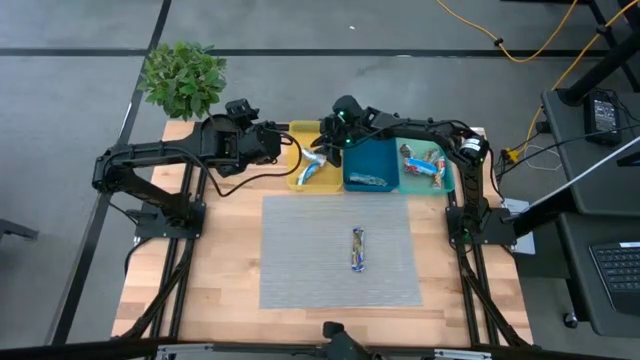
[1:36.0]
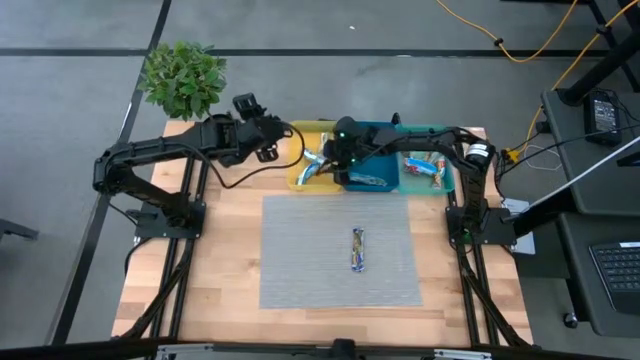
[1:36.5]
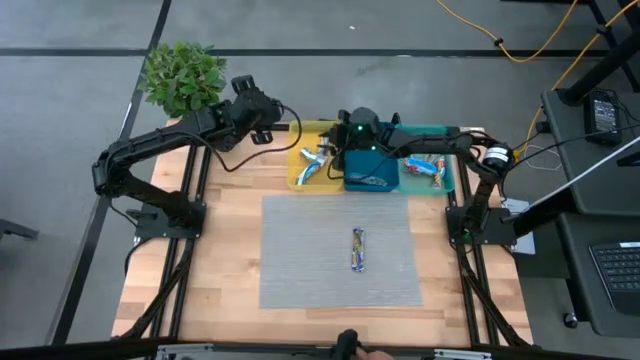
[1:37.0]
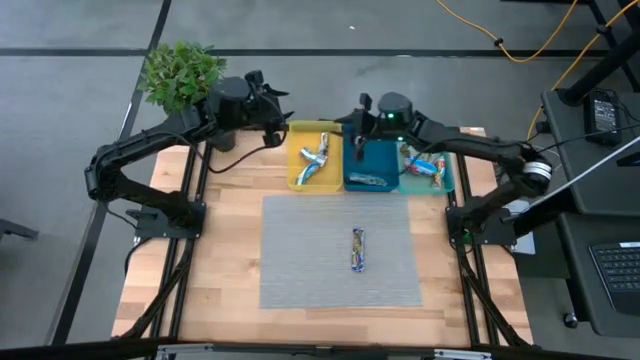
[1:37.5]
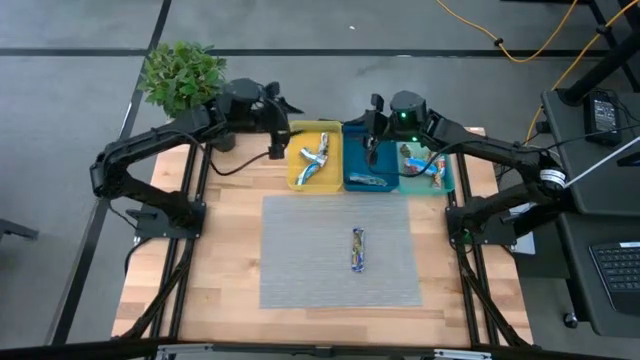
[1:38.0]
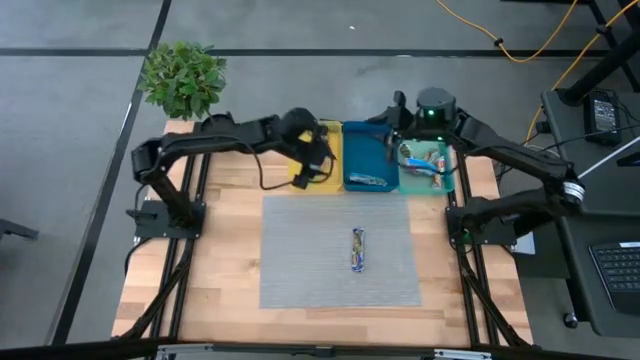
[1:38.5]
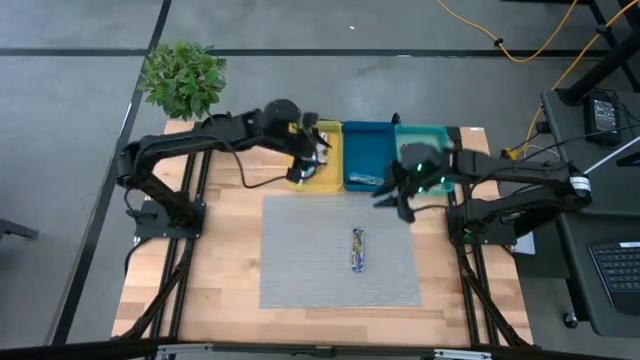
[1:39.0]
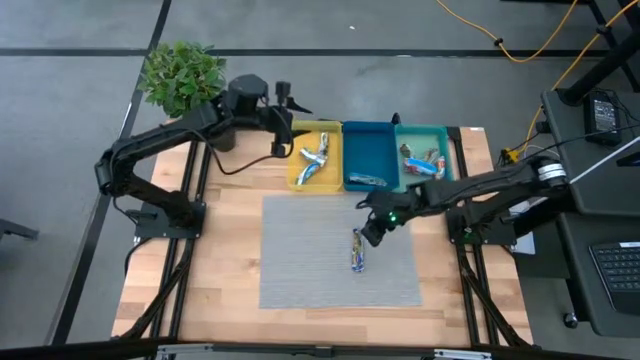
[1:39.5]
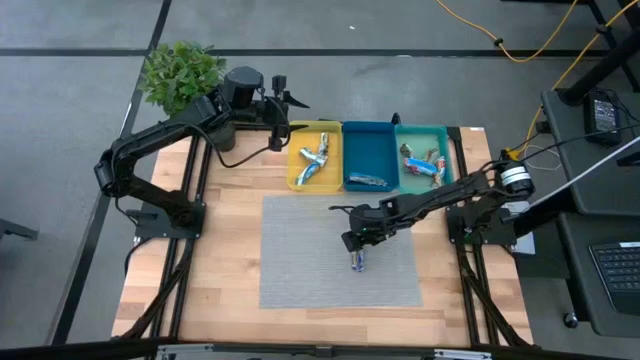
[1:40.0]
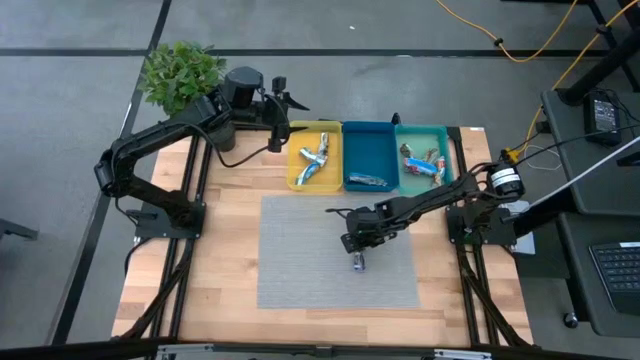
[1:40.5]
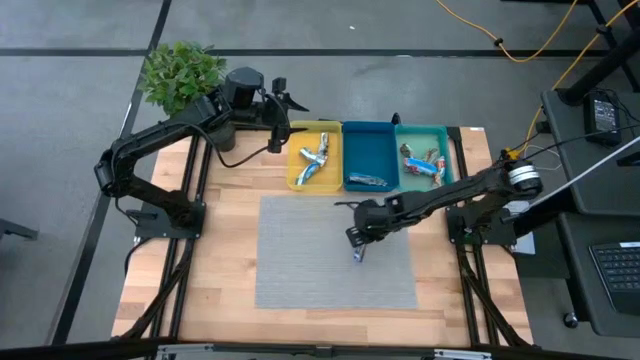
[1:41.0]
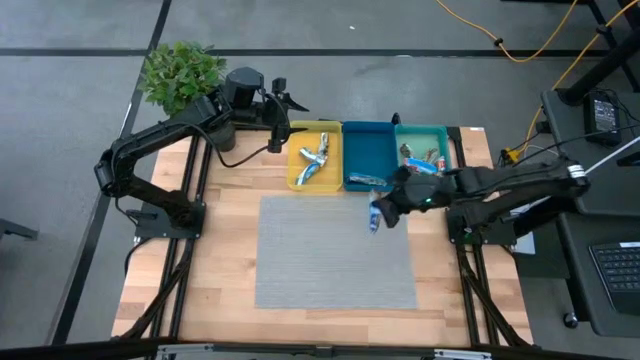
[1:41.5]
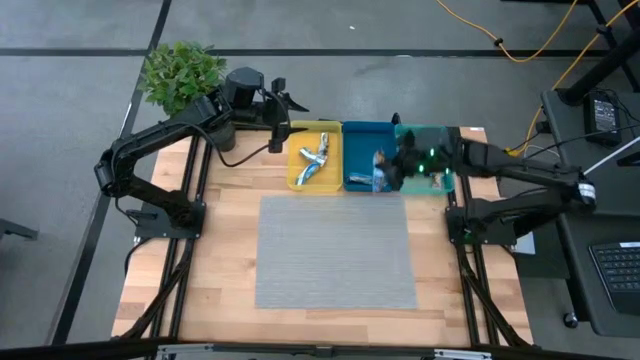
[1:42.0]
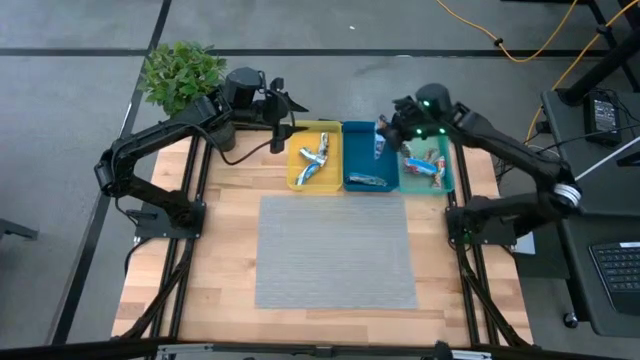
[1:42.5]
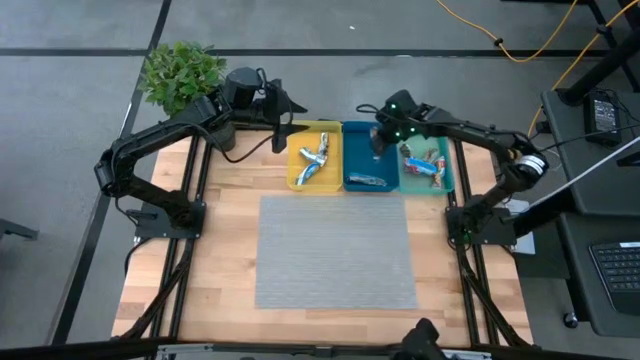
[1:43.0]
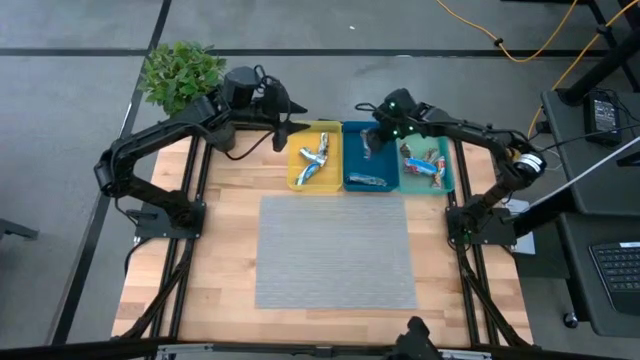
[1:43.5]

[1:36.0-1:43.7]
Task: Pick and place Granola Bars by type
Put the blue granola bar into the blue bin

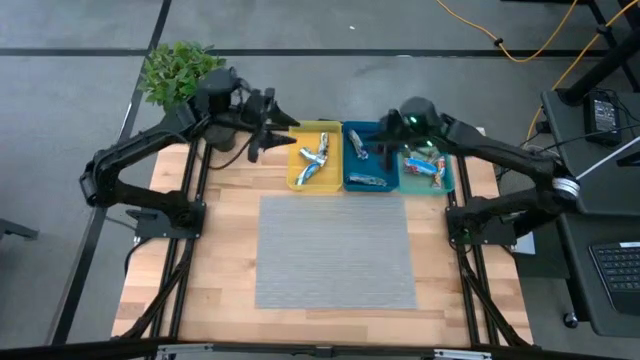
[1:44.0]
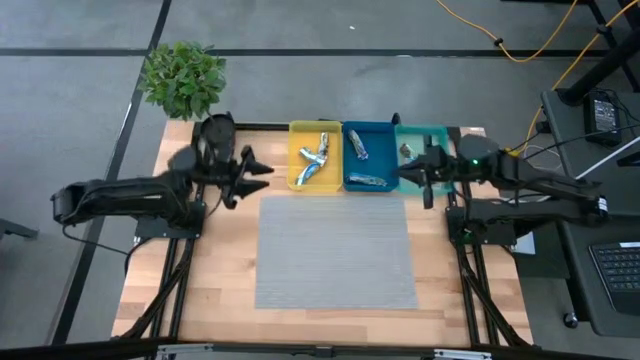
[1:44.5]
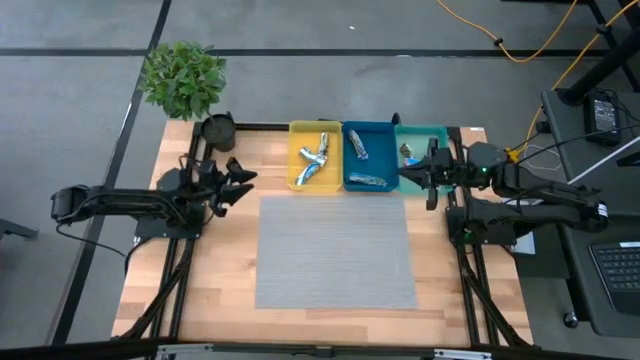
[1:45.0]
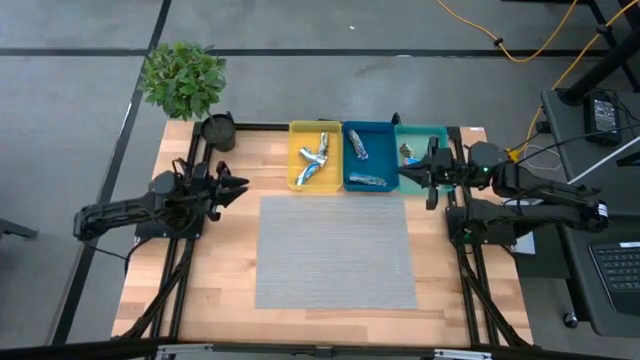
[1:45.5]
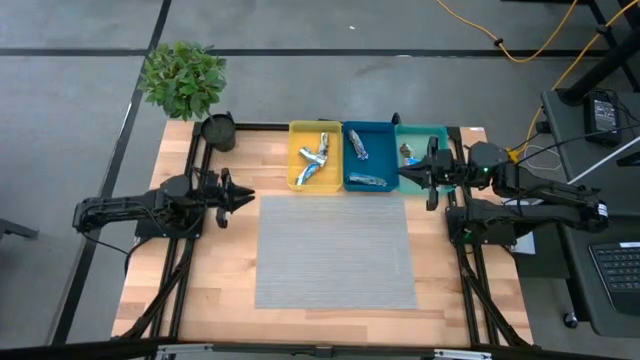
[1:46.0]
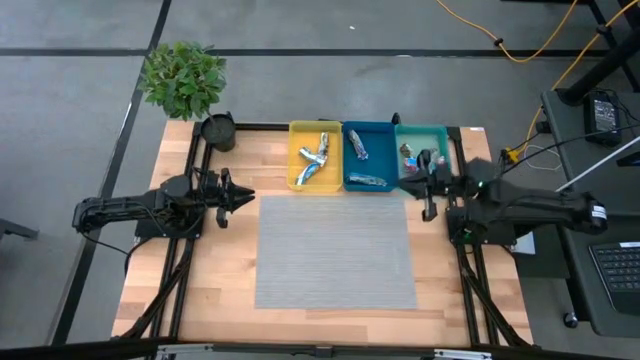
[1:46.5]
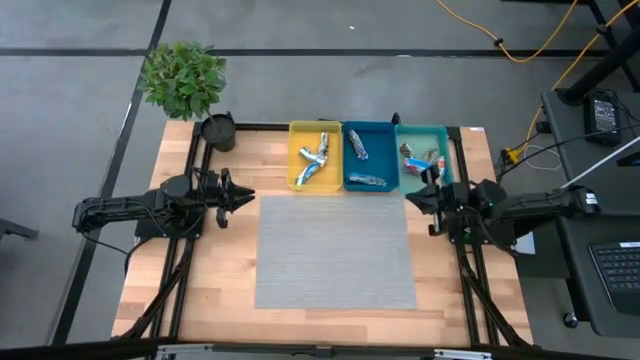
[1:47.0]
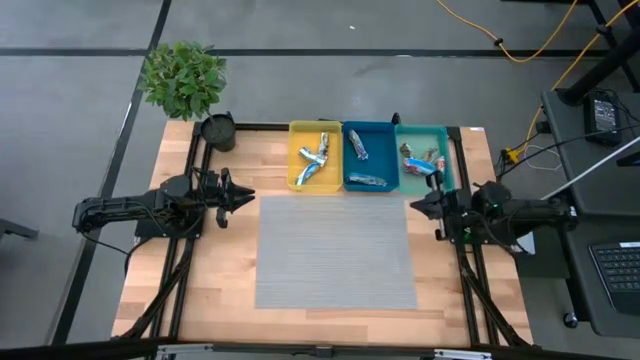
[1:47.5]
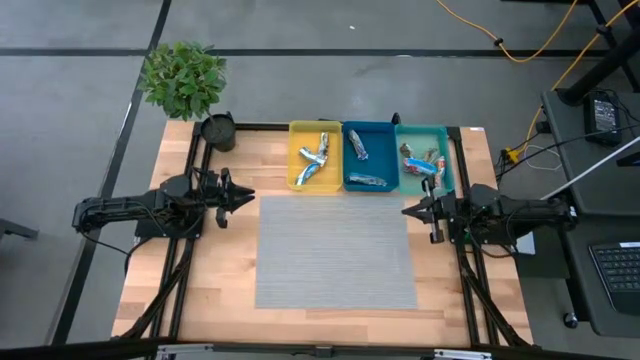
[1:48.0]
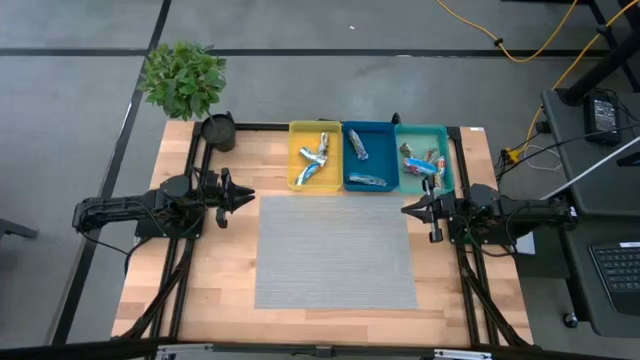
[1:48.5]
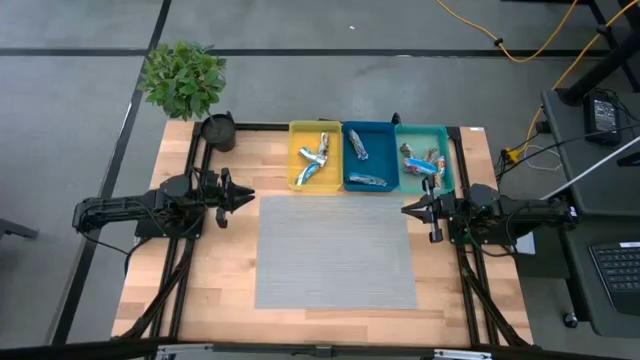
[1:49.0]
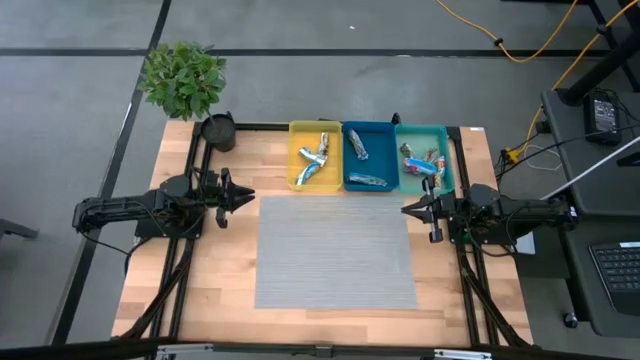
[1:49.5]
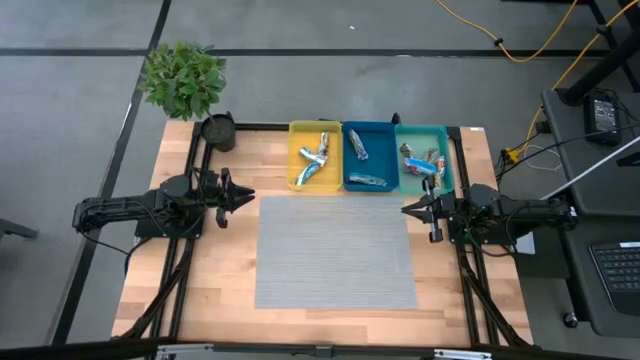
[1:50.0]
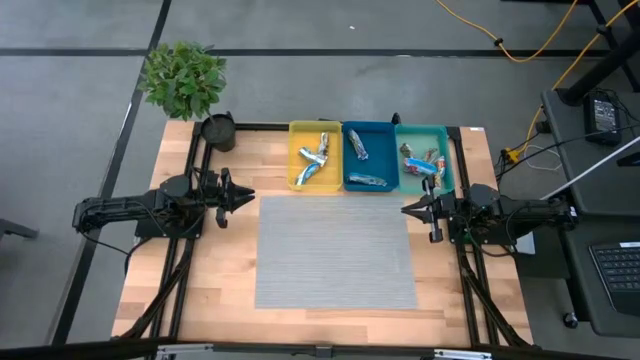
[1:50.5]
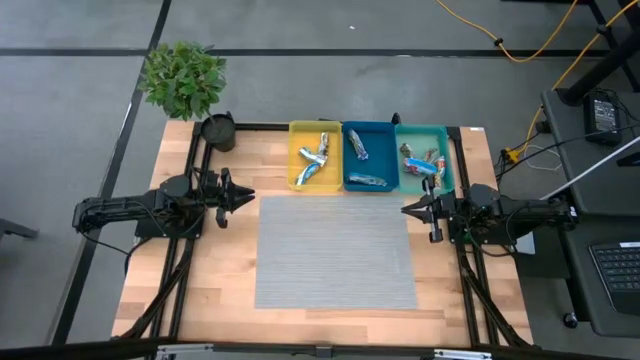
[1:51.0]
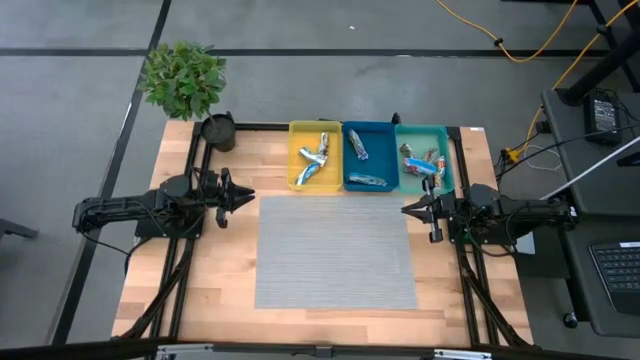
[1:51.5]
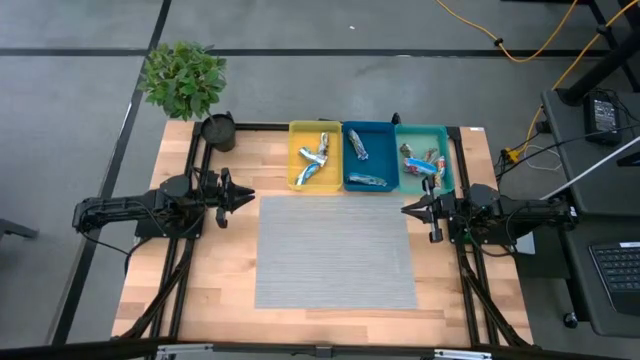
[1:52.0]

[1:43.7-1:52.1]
Return to Home Position

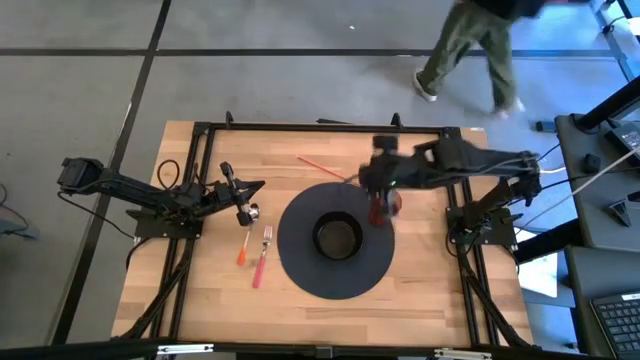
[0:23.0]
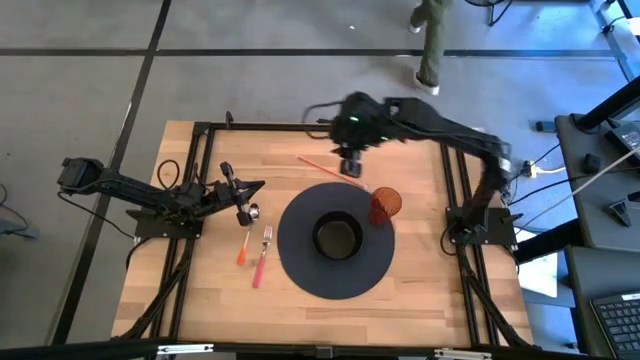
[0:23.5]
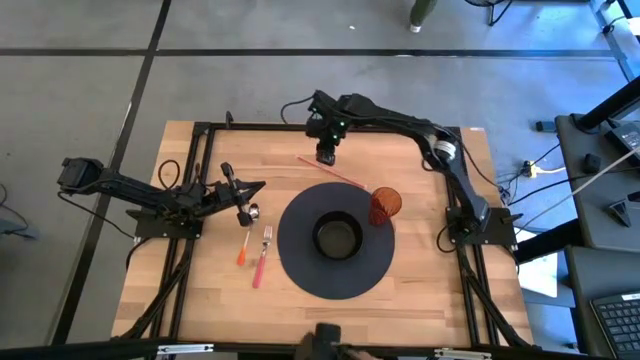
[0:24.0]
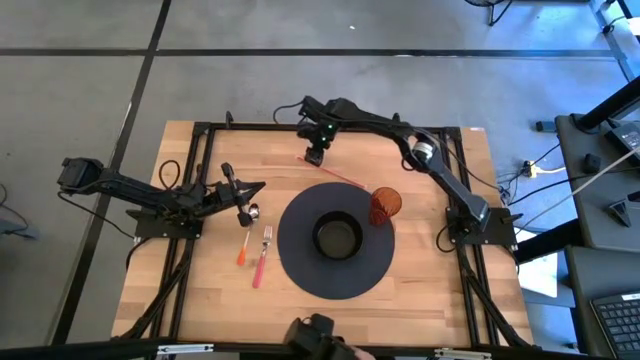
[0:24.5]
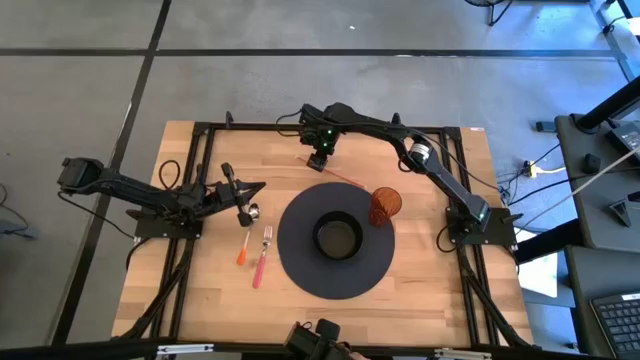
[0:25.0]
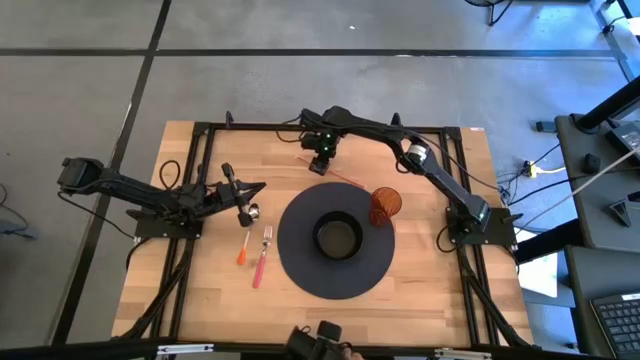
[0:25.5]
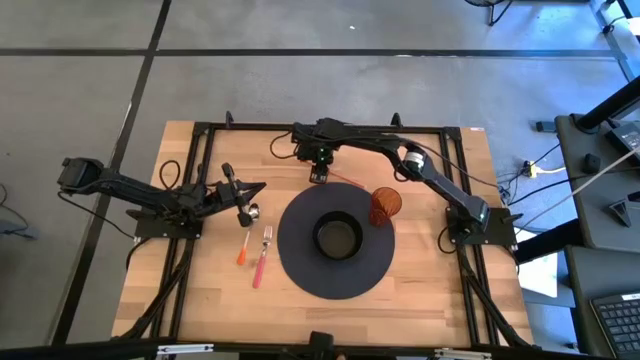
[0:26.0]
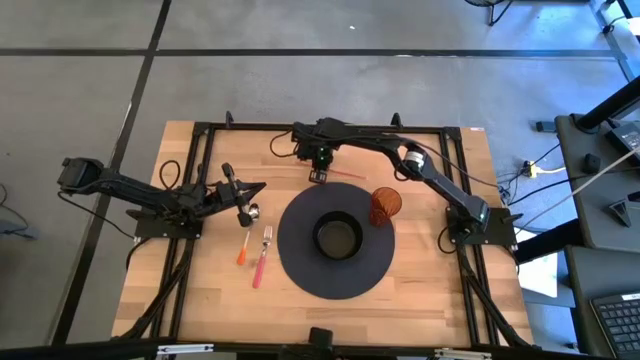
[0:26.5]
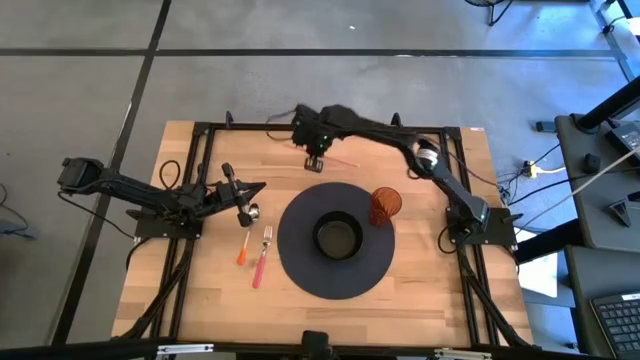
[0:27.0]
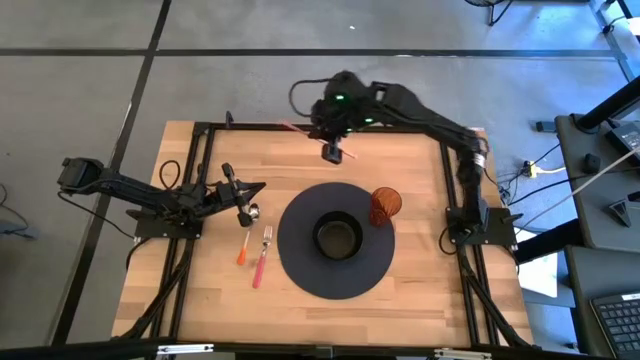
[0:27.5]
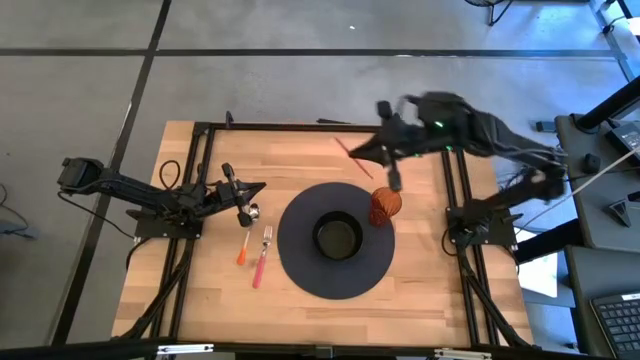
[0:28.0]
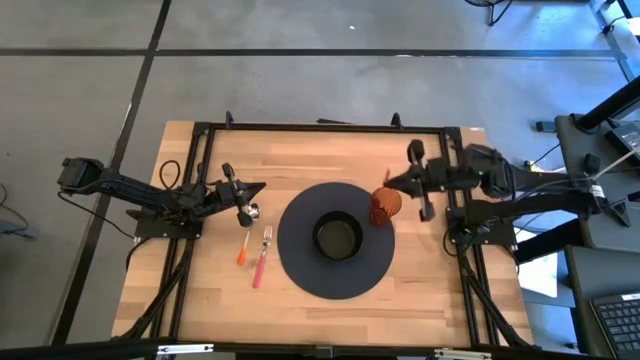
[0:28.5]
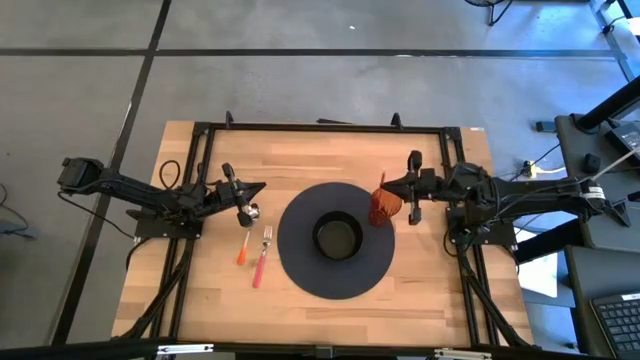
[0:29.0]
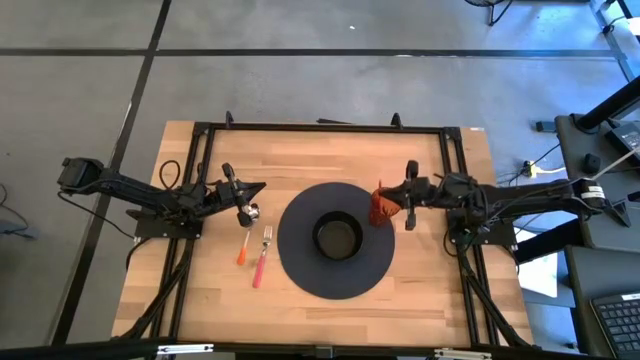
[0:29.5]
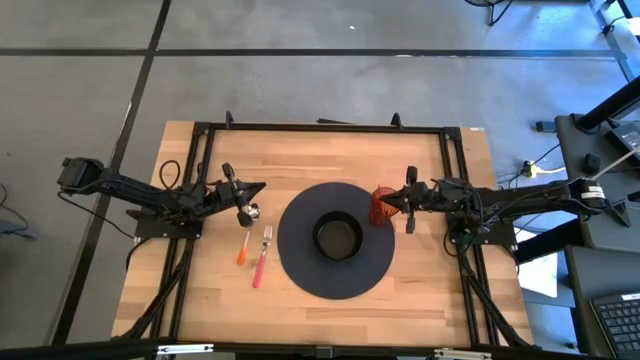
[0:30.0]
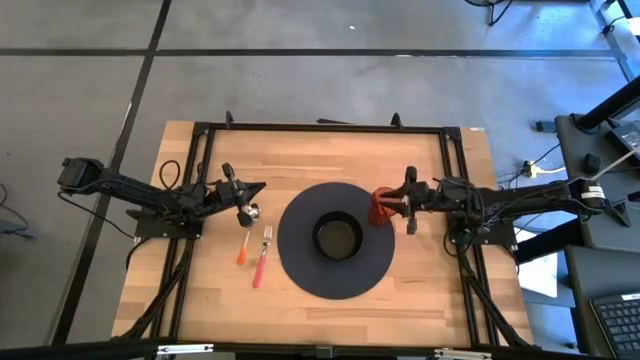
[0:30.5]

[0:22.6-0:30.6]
Task: Pick & Place Utensil
Put the orange straw into the brown cup on the black mat
